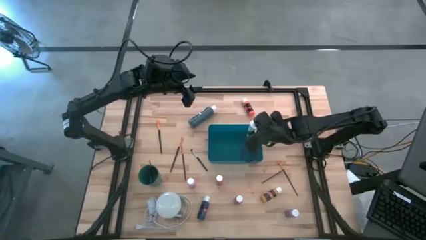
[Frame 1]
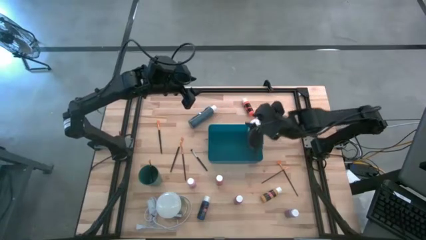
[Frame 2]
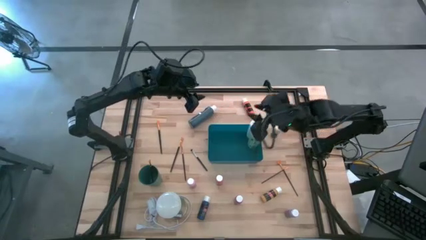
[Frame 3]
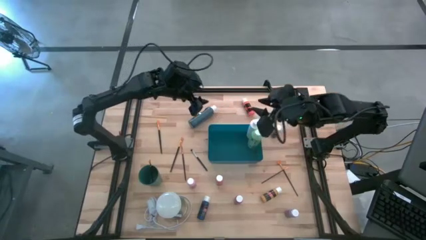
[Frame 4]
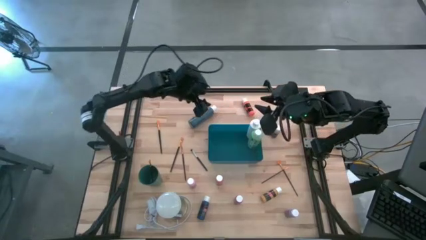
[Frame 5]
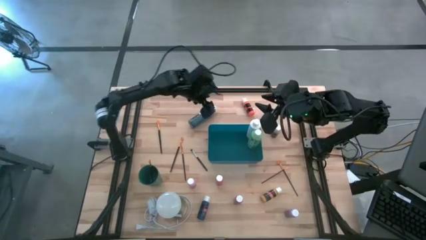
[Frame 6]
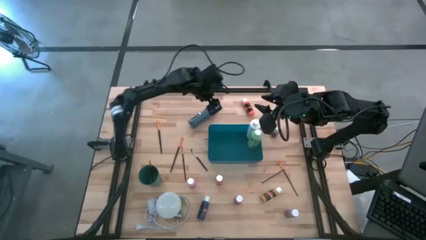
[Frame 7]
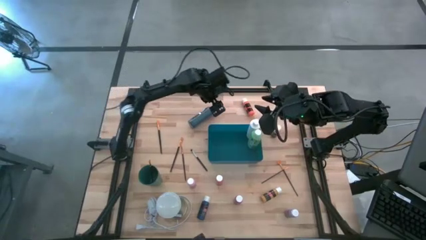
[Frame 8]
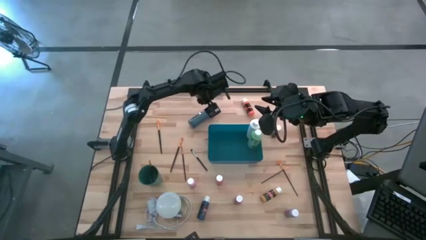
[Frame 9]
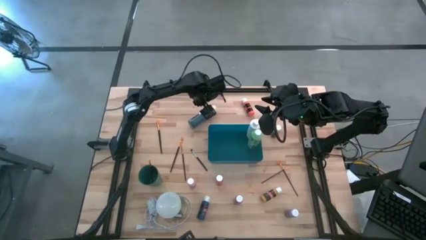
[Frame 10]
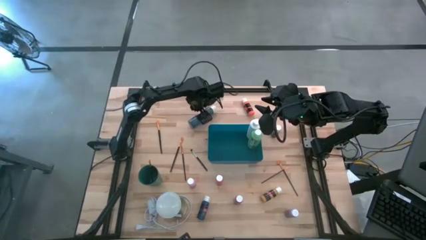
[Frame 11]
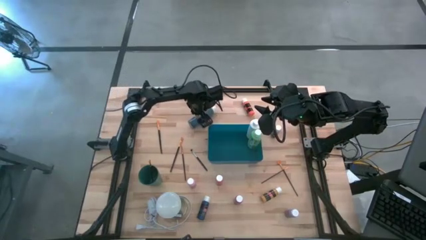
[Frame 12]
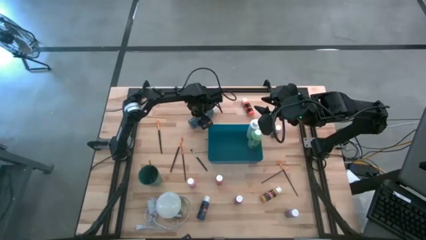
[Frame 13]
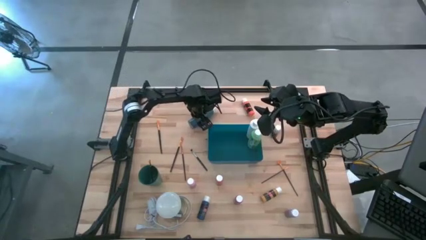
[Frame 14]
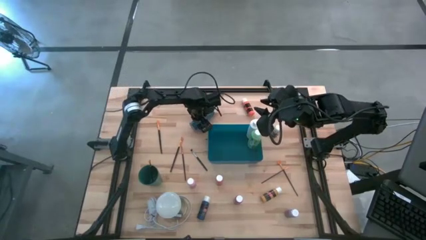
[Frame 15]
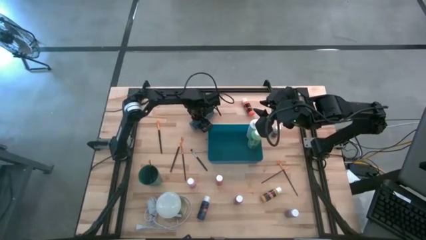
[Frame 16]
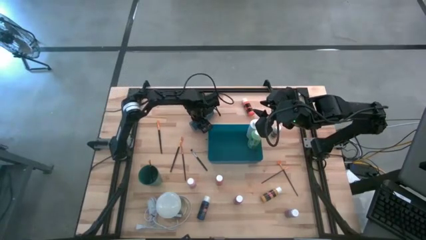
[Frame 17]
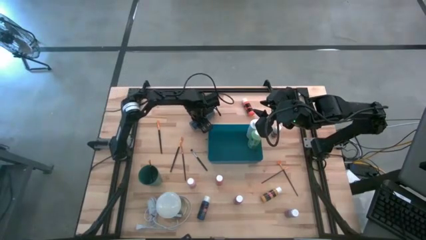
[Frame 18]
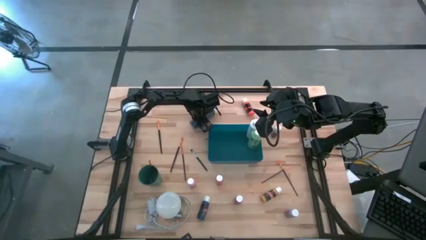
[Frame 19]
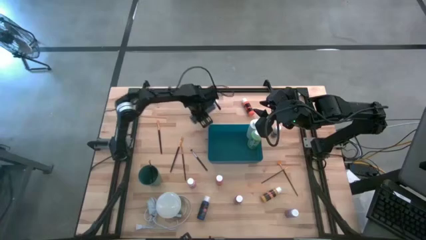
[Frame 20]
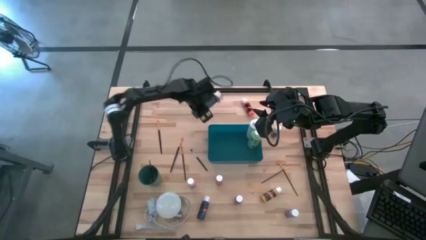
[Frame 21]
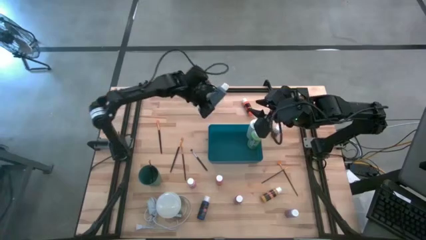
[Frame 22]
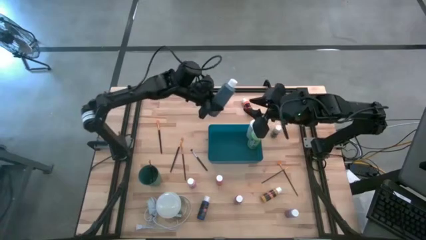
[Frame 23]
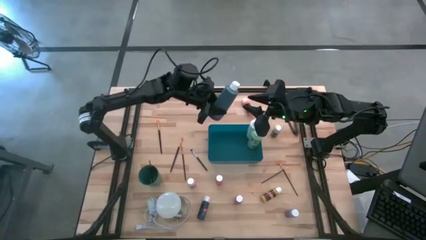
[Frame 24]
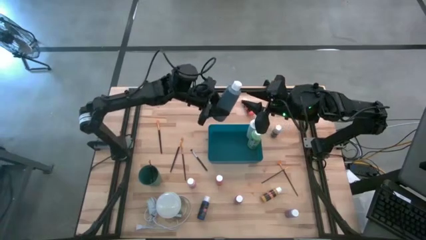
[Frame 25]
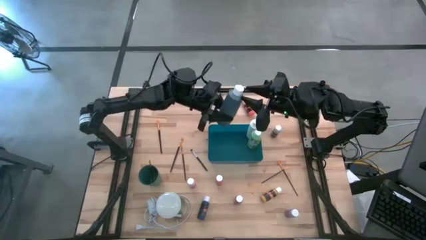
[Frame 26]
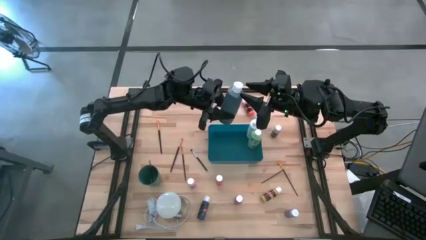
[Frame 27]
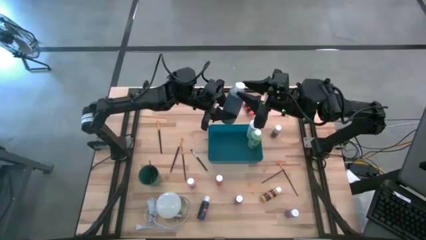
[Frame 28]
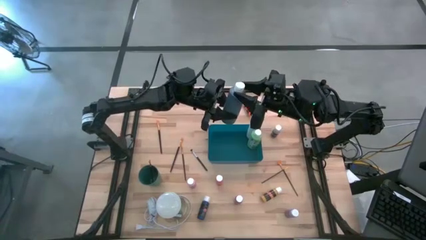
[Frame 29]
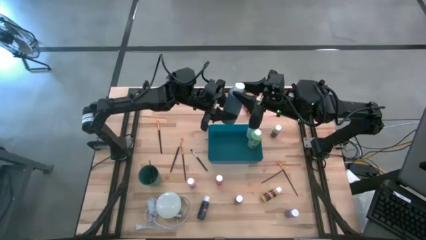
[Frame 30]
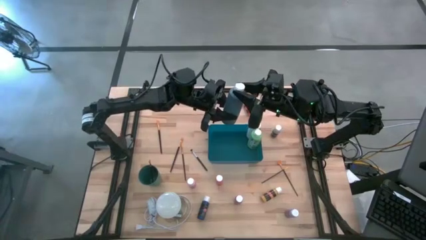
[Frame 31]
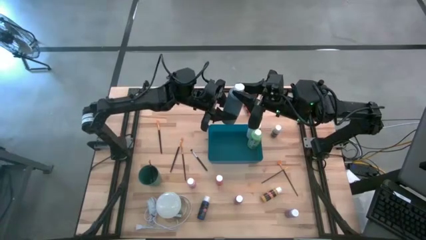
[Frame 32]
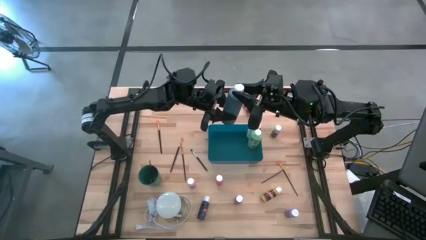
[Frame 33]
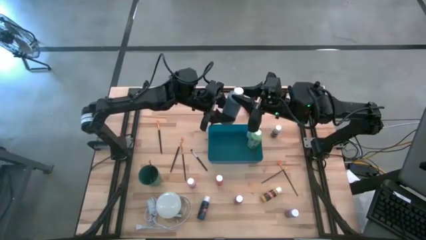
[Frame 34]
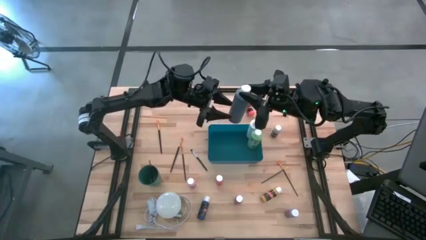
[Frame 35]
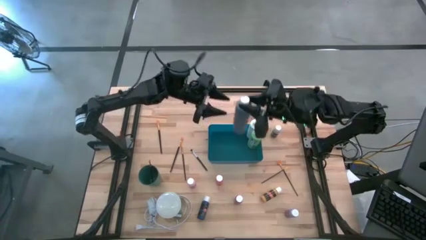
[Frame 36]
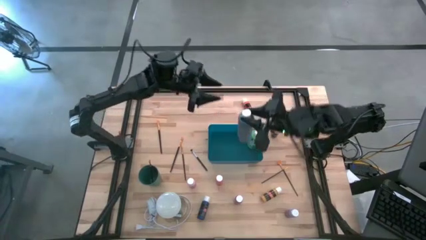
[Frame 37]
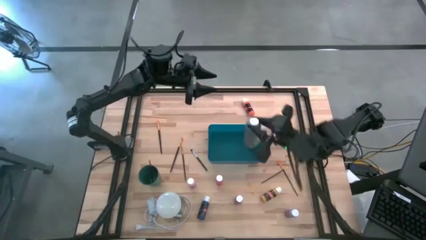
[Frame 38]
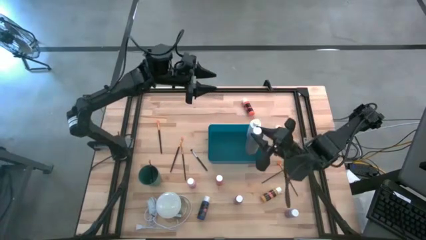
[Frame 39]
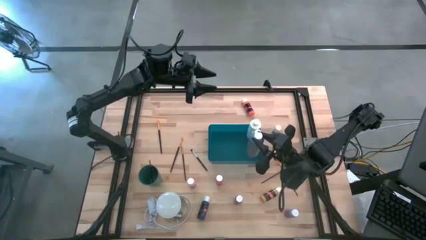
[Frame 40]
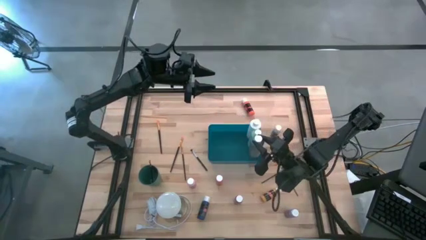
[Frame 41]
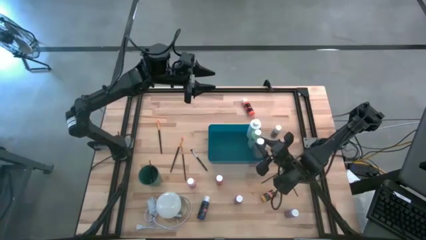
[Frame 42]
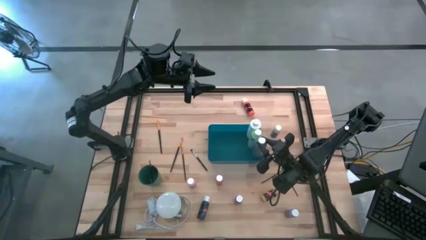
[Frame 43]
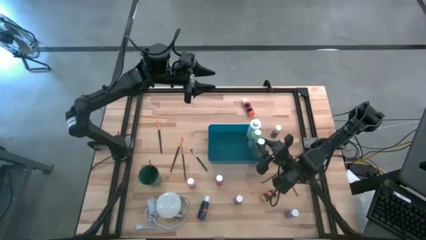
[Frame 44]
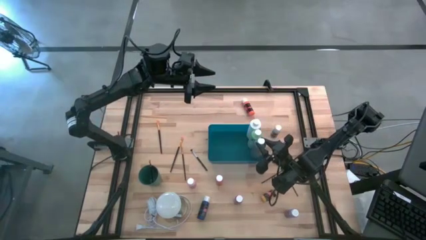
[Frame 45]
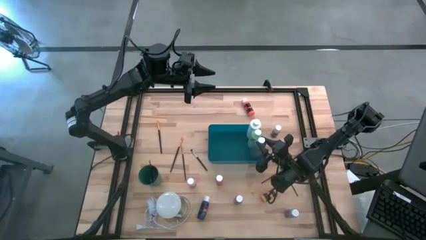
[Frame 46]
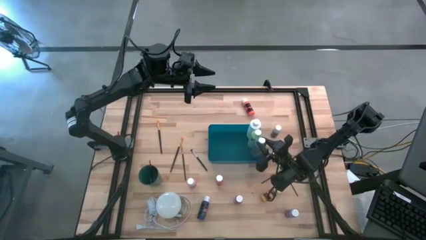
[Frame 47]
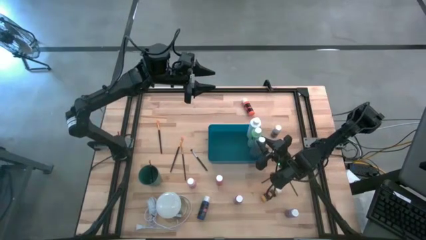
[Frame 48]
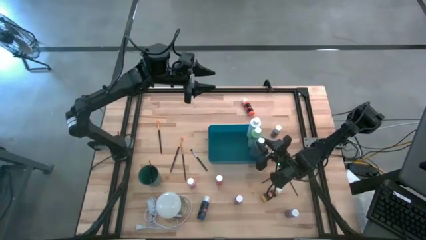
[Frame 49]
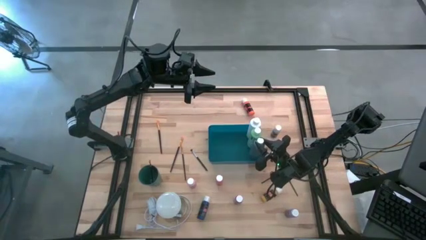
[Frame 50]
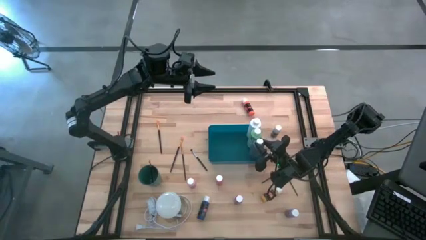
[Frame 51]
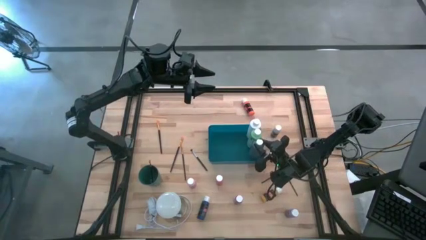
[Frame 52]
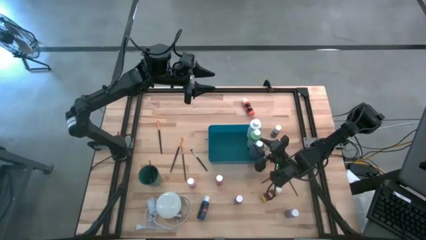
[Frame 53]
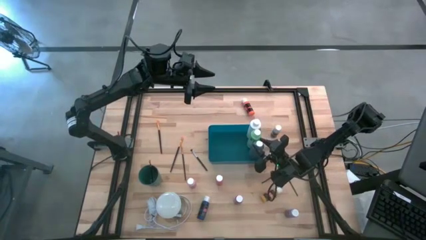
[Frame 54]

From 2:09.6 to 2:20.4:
Task: Pick & Place Paint Supplies
Put the black paint bottle into the blue bin

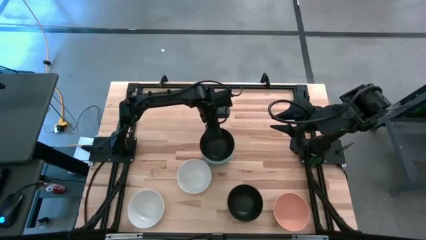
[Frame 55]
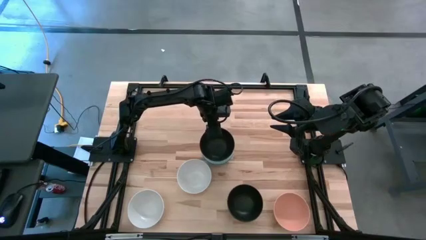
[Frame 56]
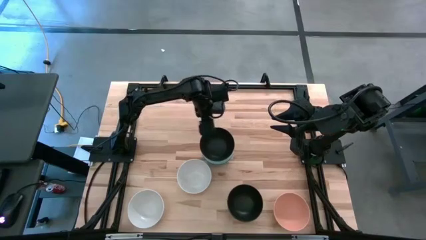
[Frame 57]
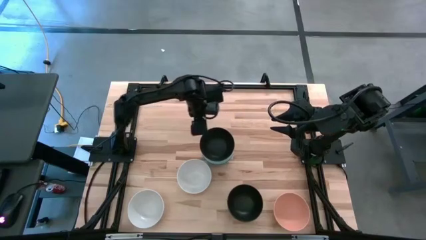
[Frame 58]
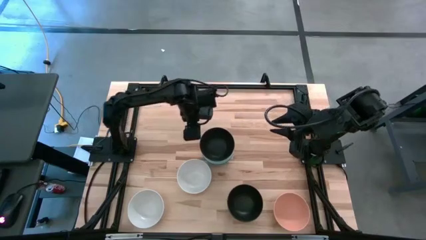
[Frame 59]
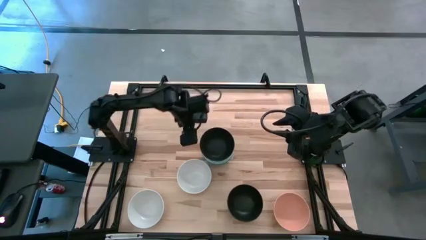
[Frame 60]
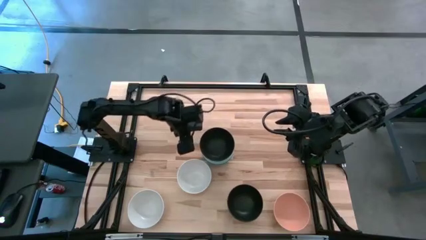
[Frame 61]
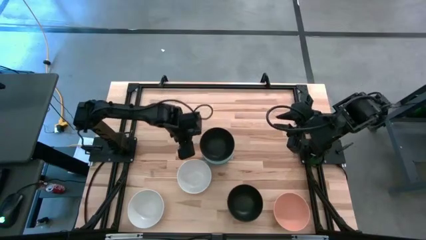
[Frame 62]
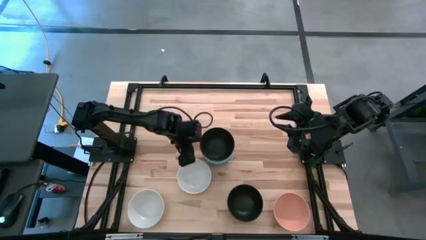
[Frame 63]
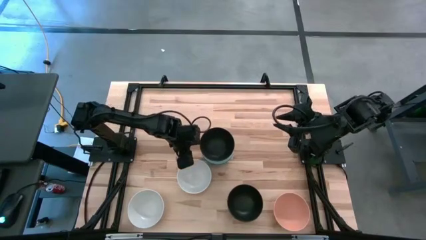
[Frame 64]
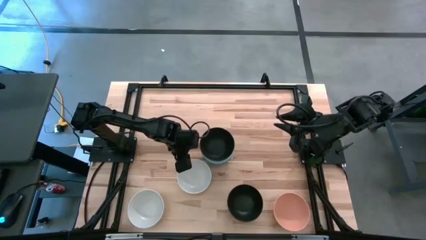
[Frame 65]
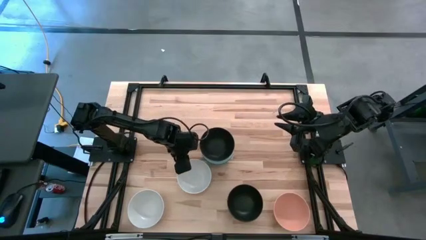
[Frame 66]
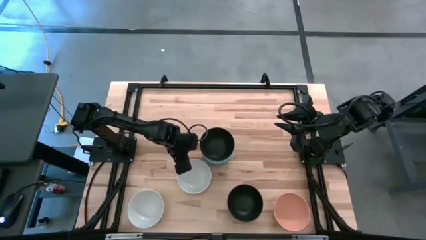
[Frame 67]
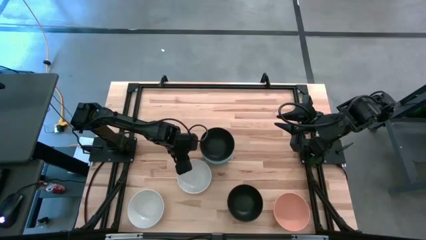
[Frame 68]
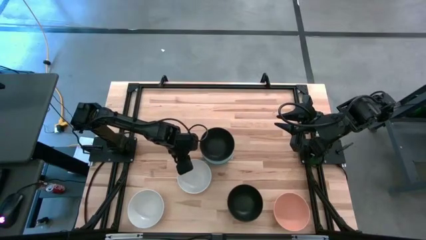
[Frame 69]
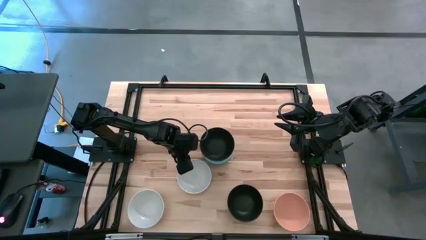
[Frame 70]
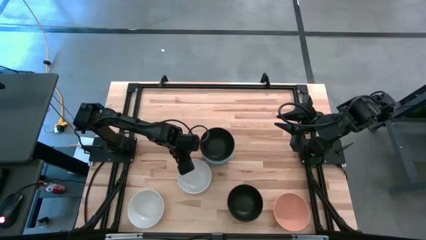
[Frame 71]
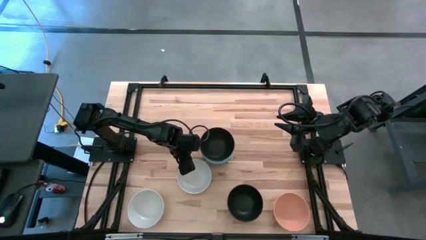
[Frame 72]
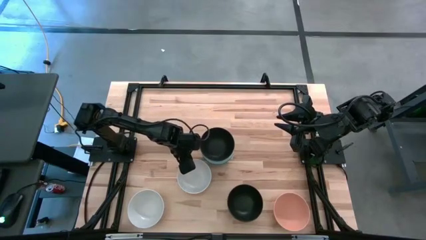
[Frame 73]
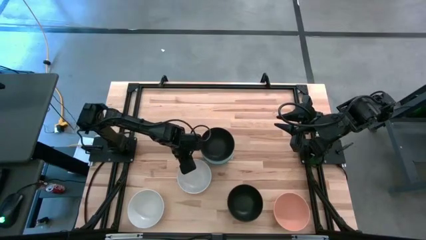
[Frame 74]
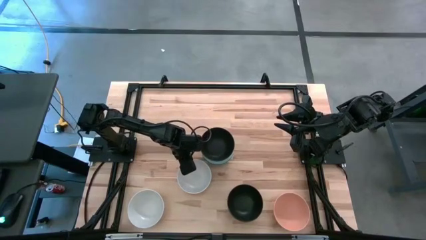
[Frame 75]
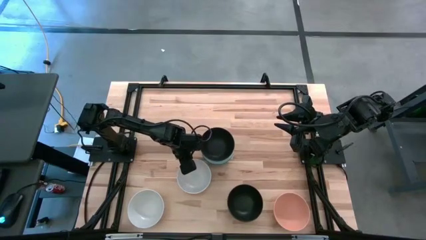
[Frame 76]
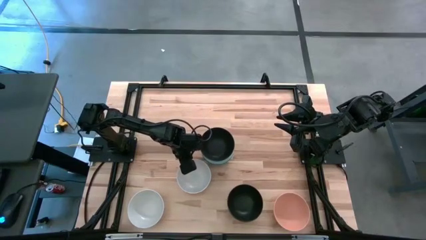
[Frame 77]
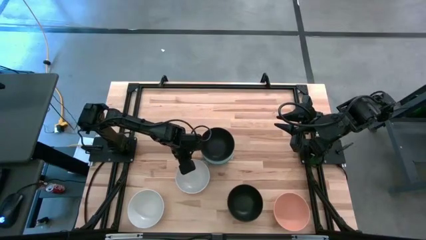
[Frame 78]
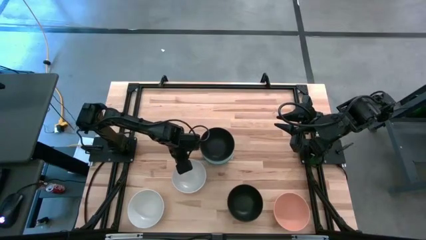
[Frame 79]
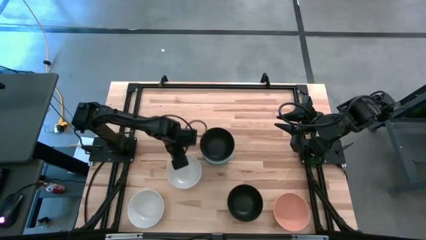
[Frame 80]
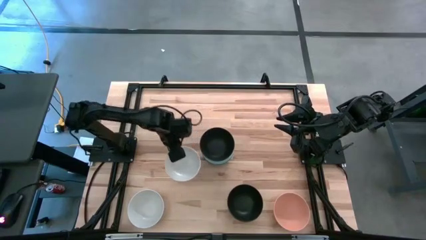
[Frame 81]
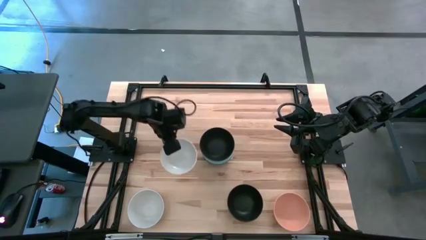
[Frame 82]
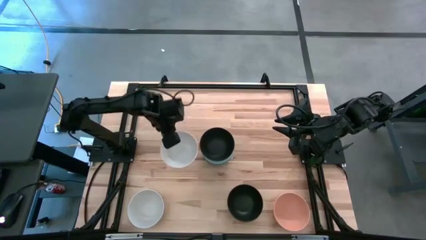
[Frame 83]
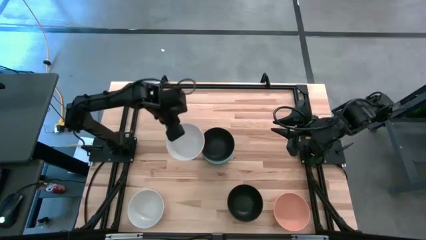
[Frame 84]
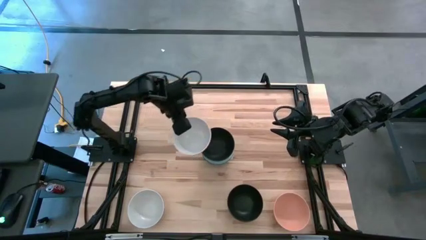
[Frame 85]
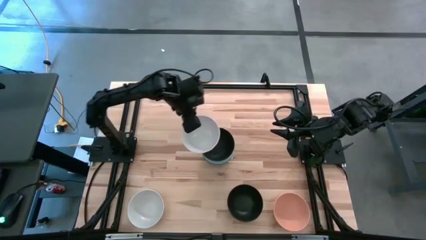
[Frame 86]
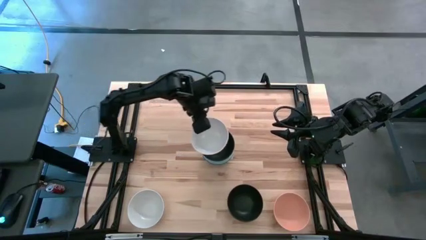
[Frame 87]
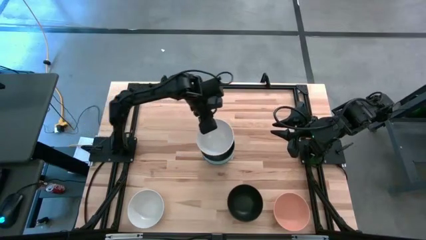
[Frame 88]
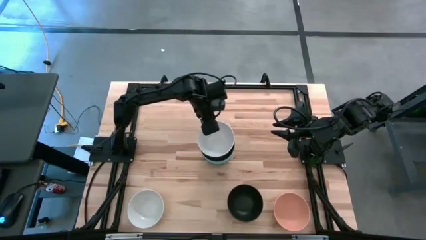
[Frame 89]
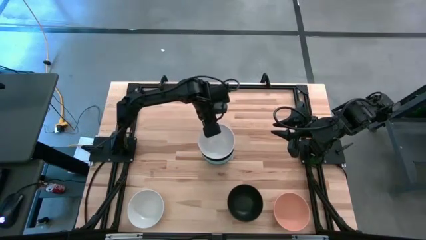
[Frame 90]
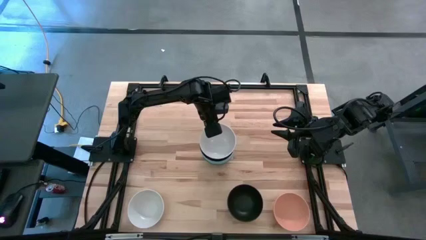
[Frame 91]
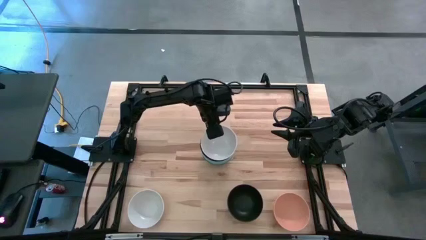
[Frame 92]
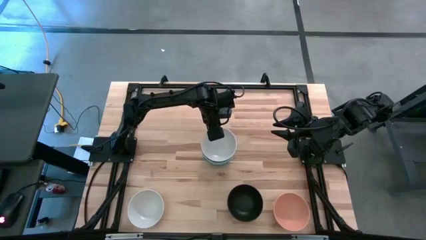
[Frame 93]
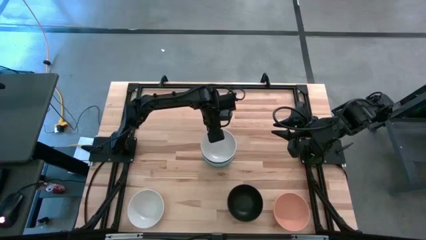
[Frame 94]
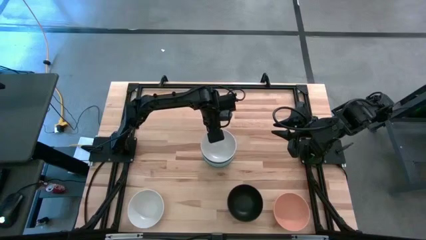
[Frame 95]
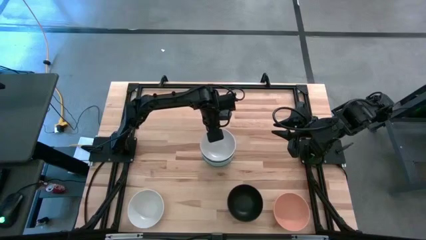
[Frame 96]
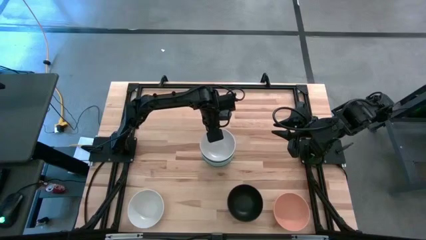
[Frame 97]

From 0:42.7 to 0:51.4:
Task: Nest bowls inside each other
Stack the top white bowl on the black bowl
